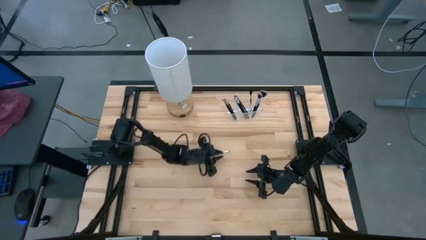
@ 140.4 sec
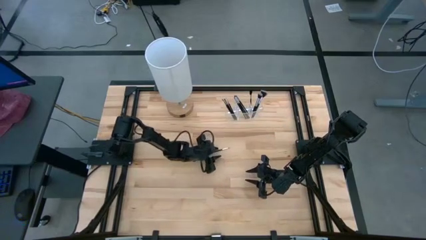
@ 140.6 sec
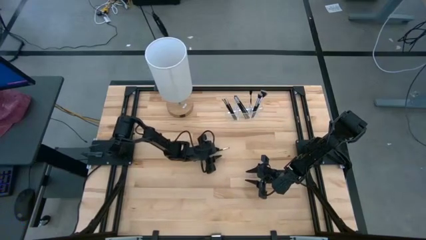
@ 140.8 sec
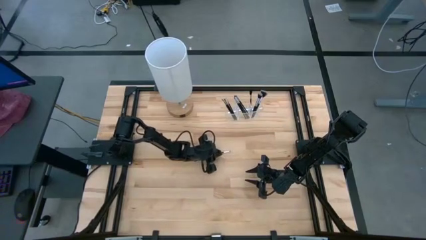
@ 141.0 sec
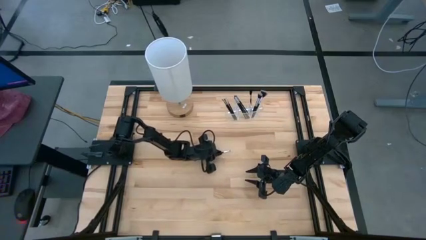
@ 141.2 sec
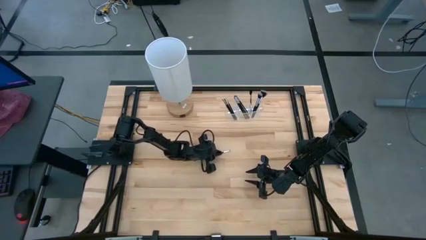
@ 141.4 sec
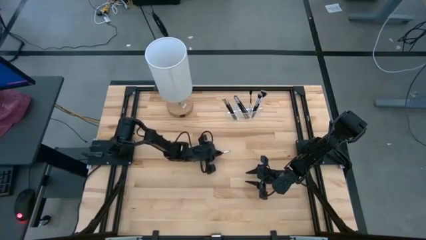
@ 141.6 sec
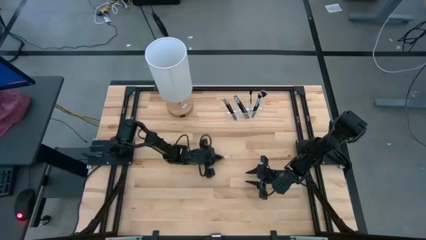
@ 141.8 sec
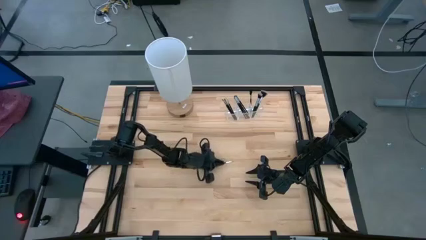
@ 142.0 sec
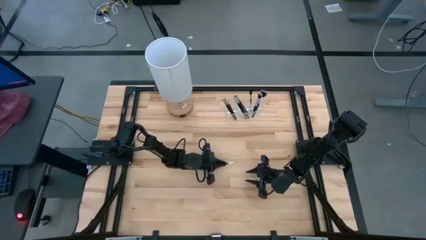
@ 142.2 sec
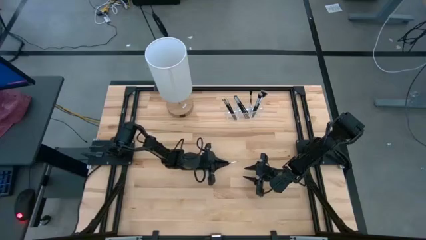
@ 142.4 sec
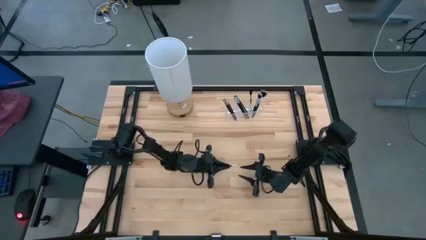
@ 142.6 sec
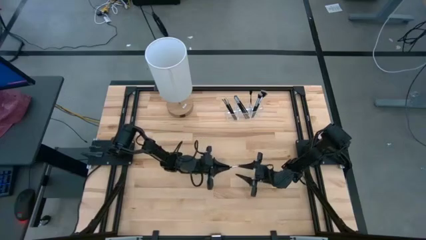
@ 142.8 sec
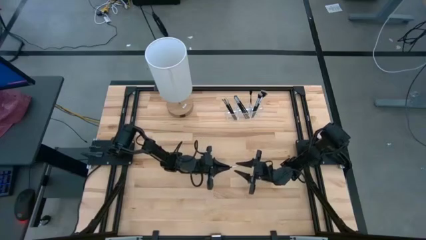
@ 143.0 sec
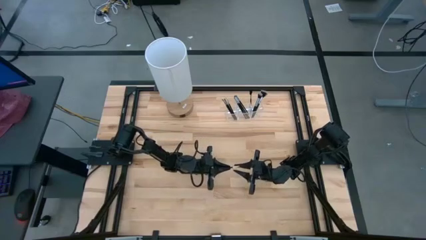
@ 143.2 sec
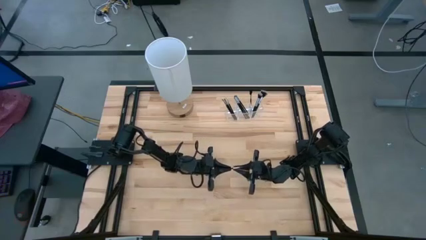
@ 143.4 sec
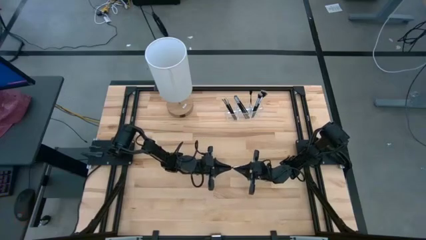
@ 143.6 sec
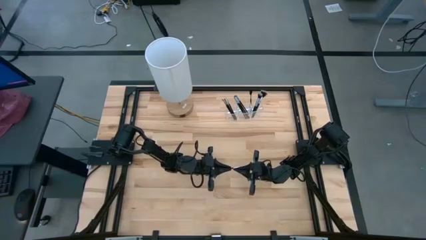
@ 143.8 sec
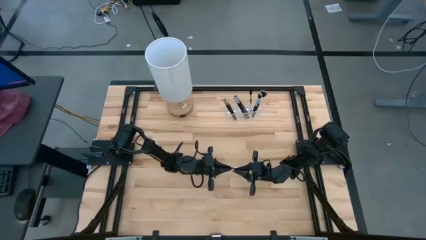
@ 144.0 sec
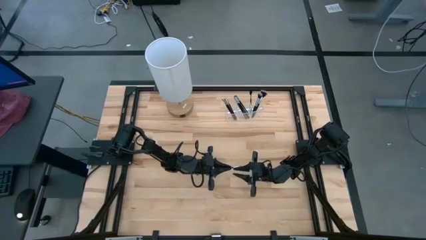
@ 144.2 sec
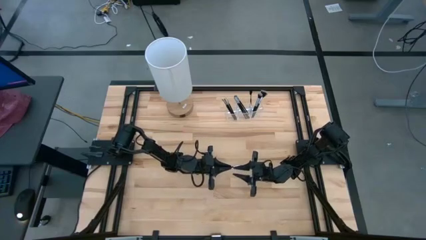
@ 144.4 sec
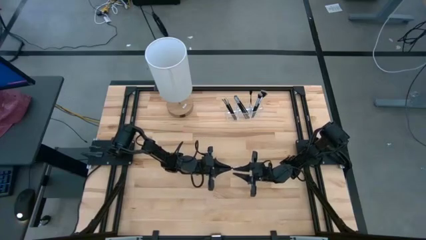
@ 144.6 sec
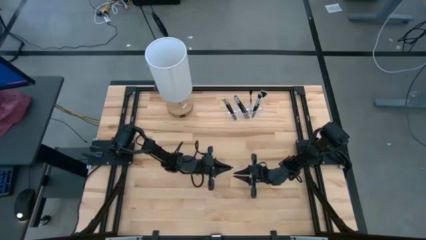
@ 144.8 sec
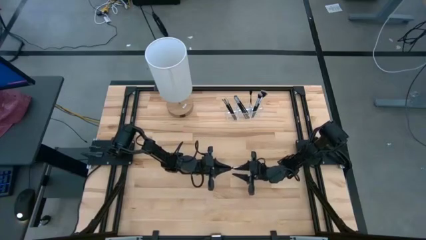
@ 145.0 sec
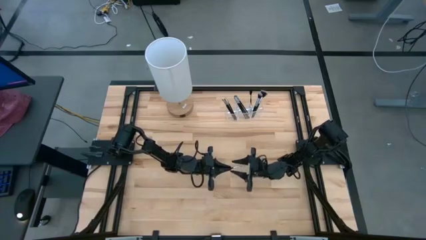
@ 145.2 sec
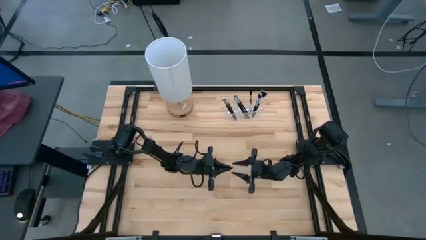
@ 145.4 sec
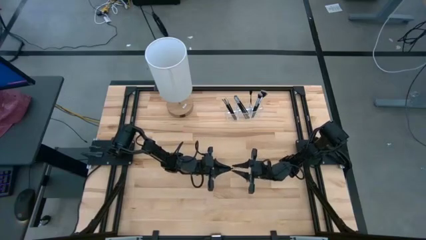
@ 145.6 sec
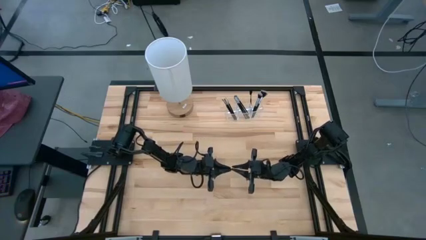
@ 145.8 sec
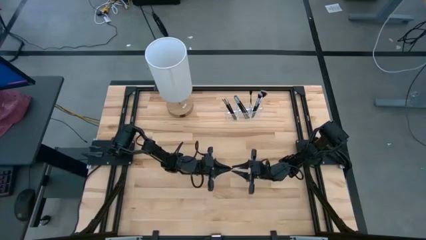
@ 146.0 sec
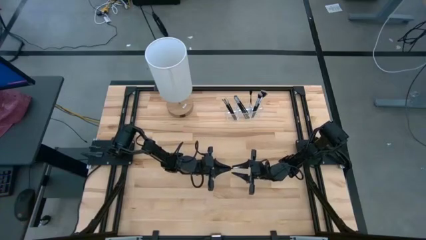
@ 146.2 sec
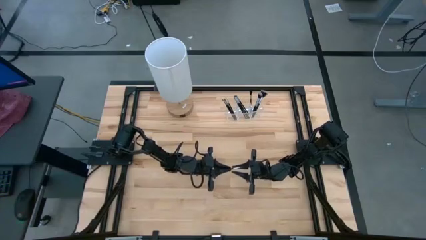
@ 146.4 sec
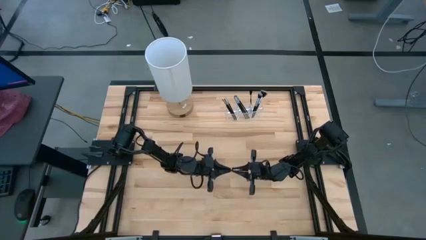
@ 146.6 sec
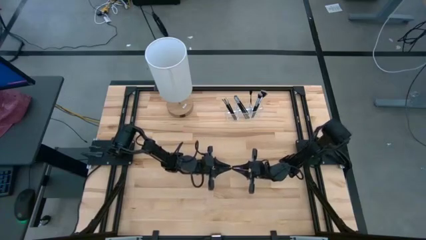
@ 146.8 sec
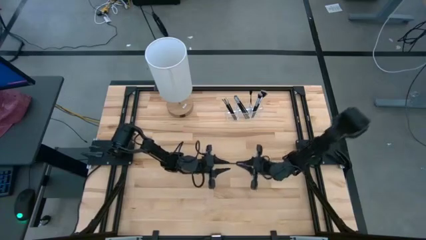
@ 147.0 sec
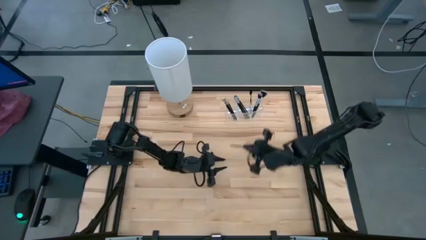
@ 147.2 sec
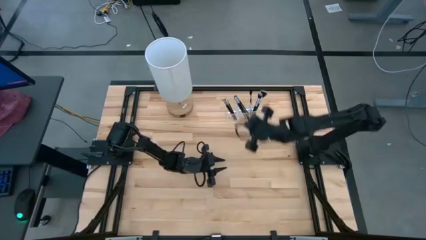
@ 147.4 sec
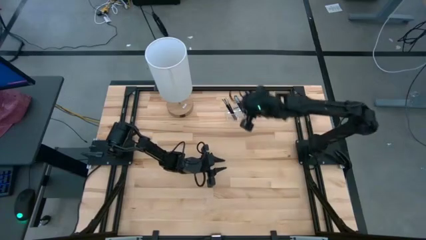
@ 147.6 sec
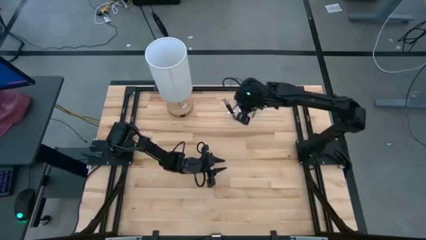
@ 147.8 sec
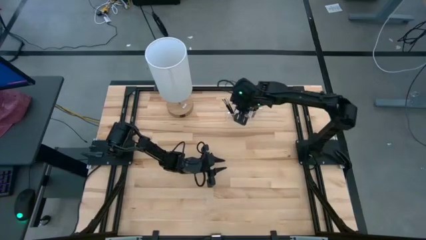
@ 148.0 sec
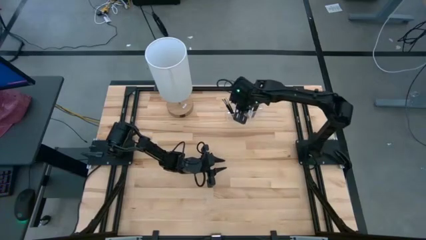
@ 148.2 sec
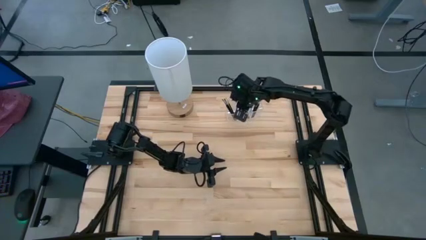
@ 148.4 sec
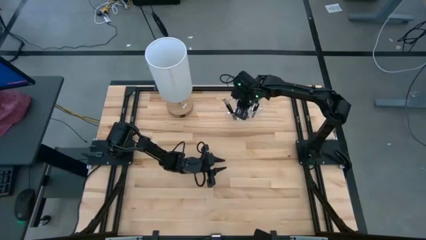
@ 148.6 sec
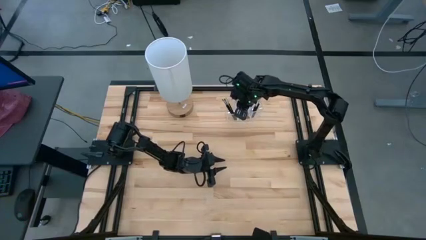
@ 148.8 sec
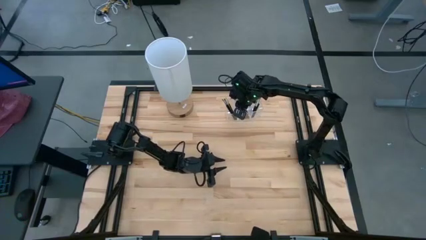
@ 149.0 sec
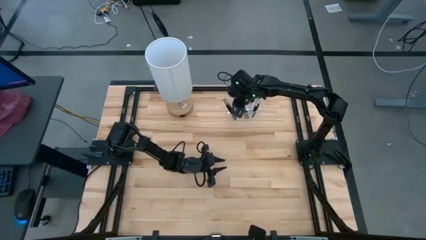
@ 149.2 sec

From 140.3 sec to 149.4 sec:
Task: Sort items
Put the eyeshadow brush into the transparent organizer

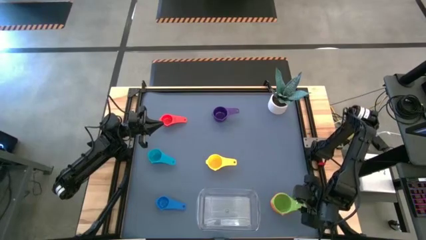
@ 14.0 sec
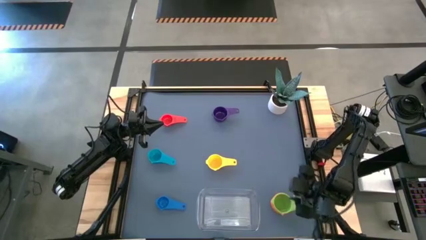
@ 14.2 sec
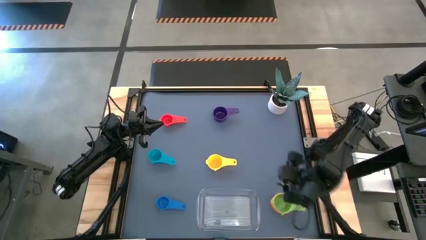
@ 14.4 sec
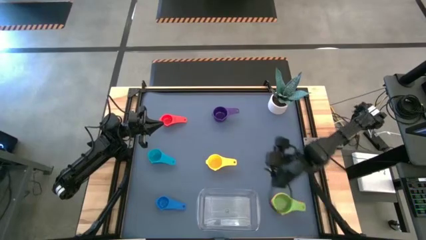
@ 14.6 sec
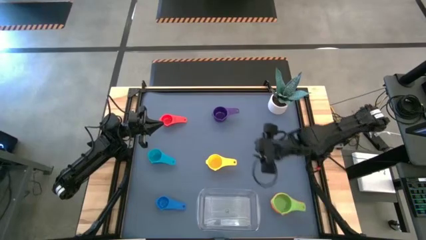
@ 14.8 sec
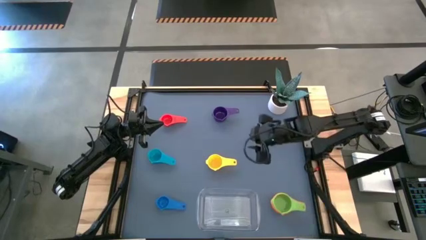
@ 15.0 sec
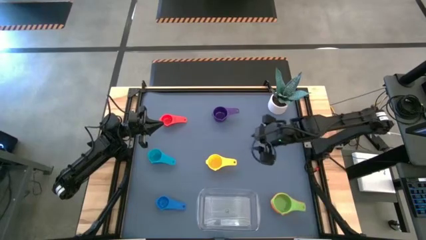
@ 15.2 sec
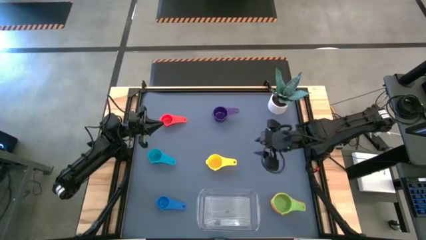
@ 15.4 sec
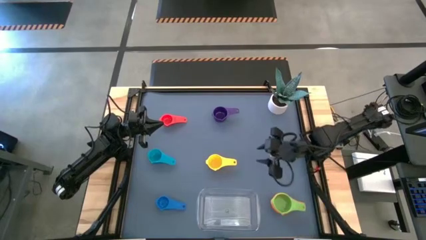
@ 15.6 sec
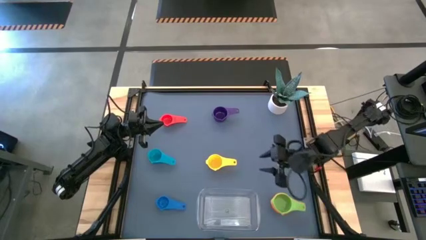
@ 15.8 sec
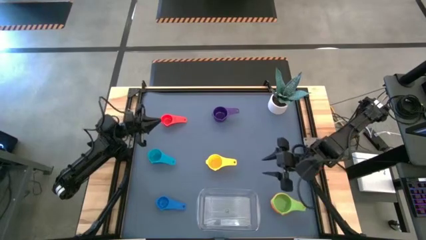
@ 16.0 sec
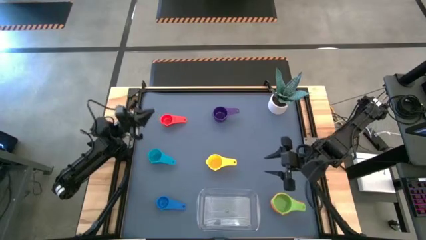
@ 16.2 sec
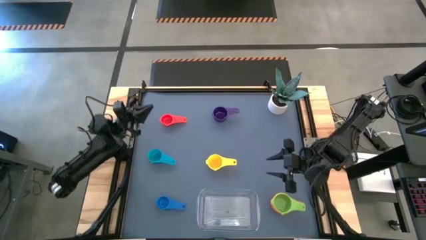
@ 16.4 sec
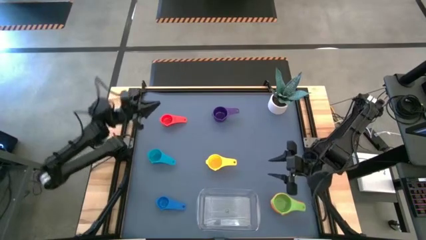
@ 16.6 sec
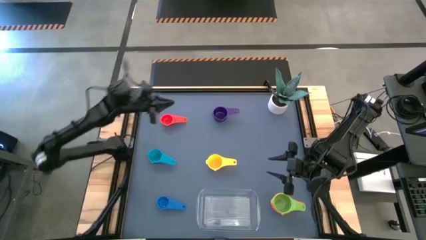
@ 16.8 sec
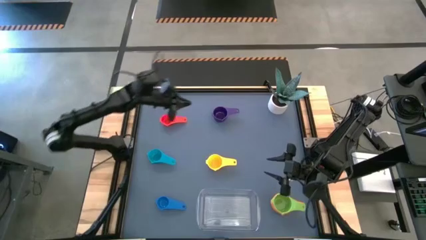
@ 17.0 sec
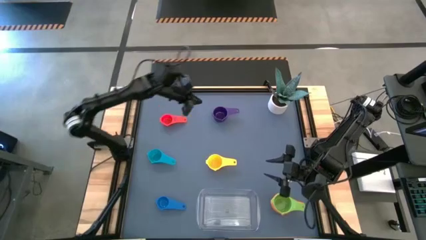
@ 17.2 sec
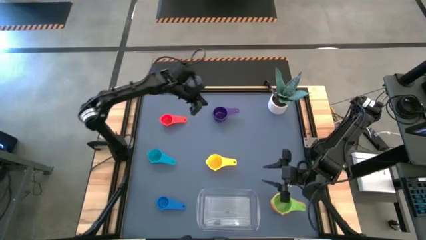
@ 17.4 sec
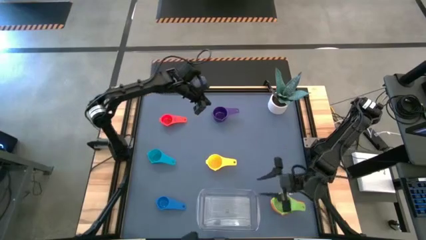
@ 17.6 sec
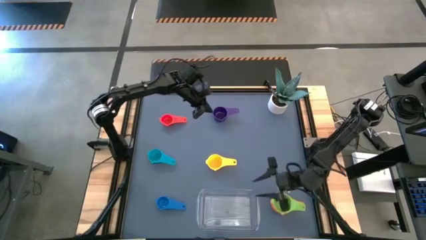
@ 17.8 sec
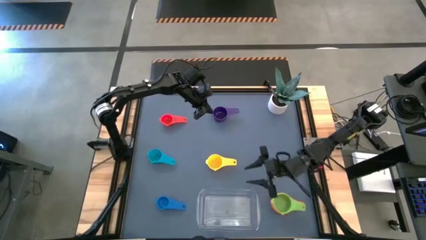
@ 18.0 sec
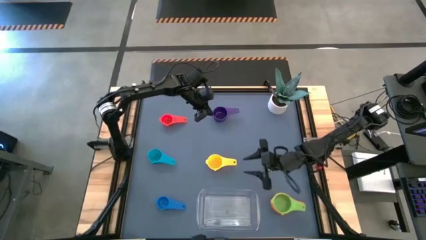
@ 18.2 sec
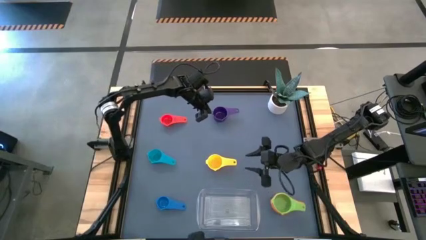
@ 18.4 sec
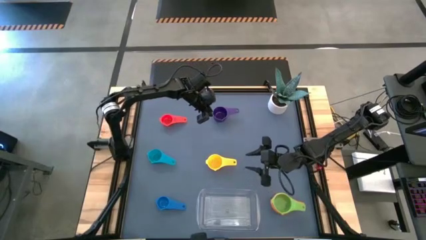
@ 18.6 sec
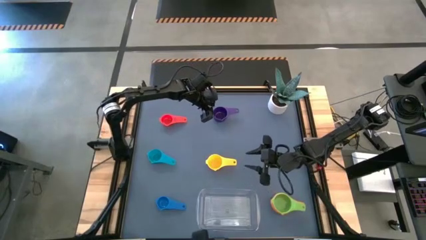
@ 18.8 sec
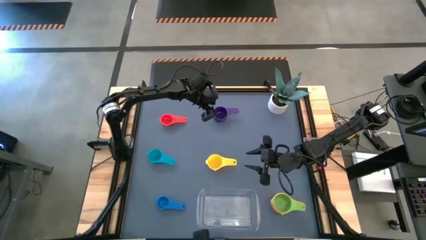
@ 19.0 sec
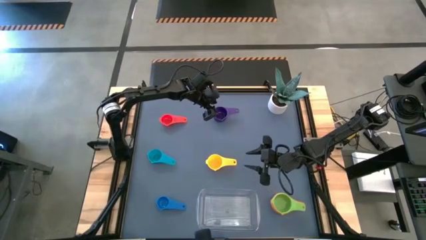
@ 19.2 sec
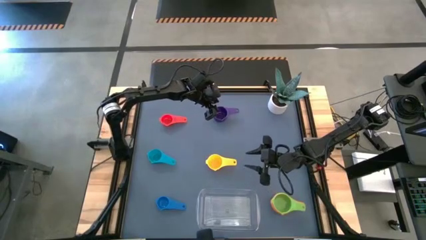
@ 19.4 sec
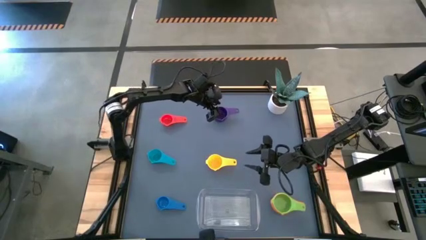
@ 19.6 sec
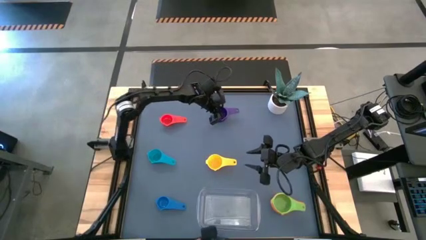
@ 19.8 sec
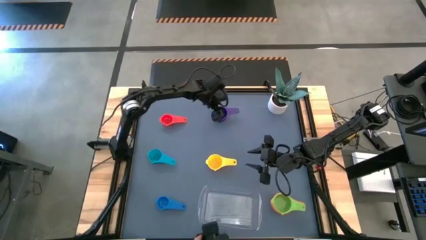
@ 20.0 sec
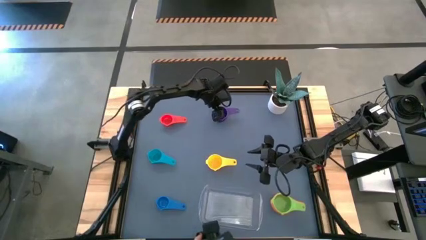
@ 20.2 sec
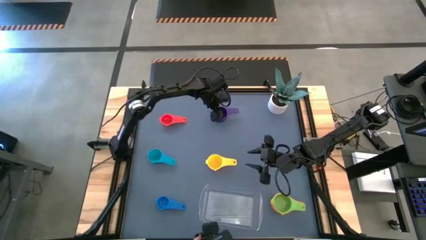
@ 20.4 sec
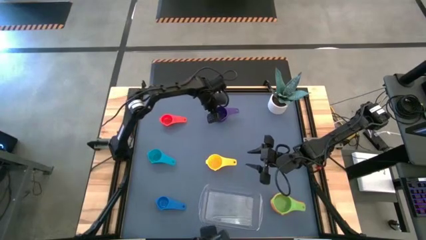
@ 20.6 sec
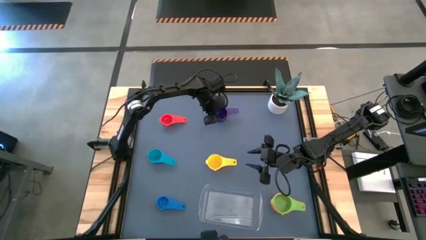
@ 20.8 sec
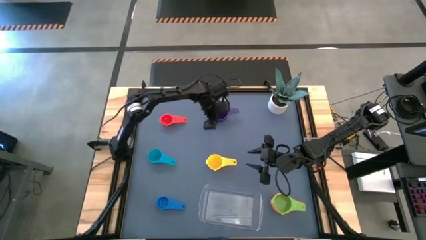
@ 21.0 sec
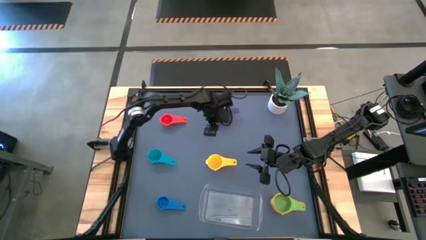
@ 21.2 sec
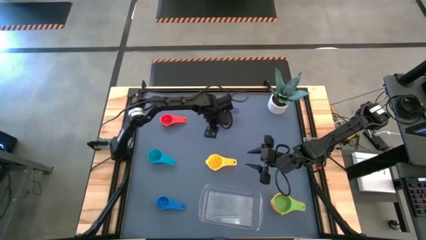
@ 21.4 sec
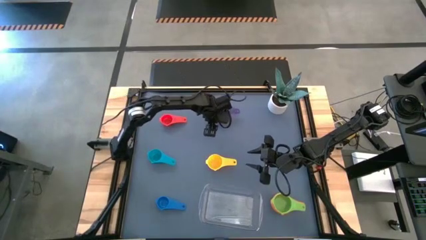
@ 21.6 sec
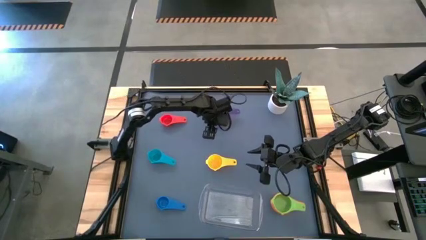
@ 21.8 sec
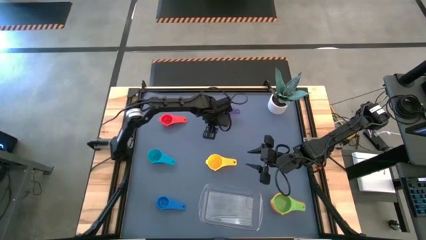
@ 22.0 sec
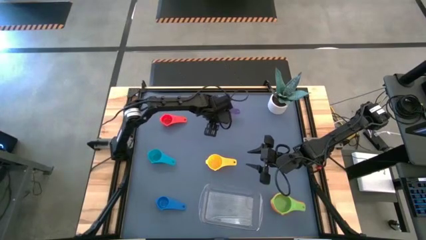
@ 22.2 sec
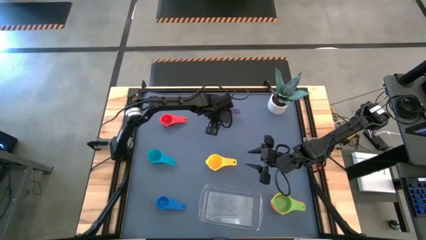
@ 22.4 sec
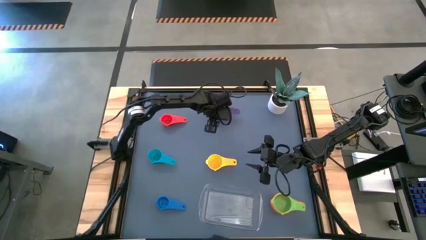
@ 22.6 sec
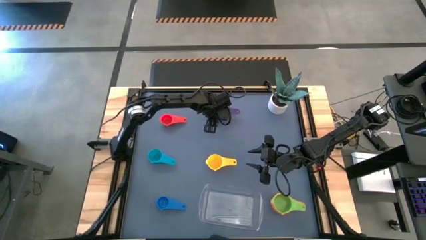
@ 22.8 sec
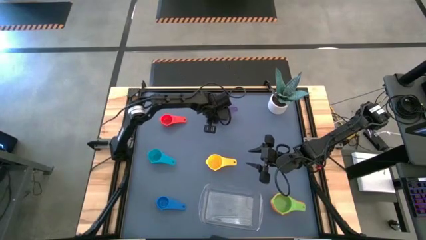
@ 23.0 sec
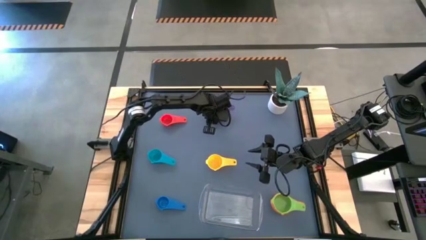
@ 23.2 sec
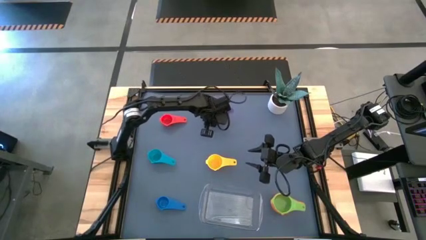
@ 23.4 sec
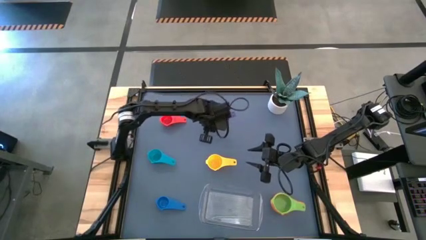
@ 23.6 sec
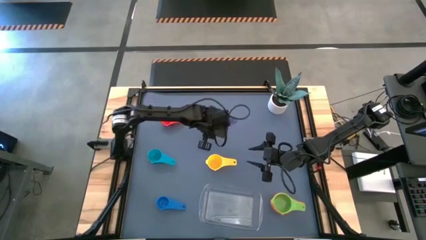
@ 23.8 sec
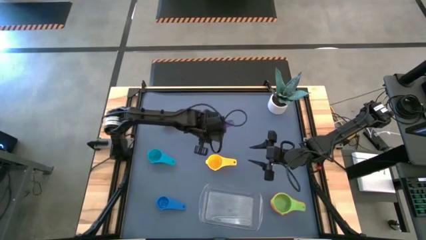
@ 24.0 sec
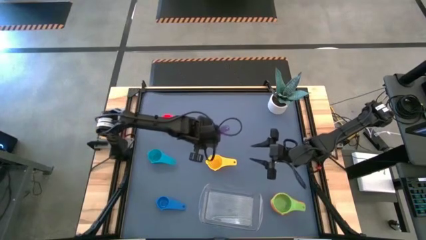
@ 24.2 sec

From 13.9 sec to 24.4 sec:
Task: Nest measuring cups in basket
Stack the violet measuring cup on top of the green measuring cup
